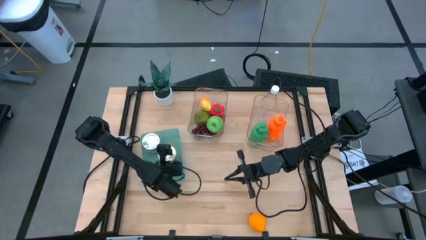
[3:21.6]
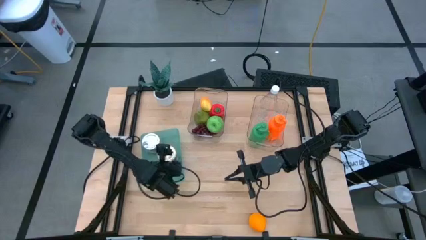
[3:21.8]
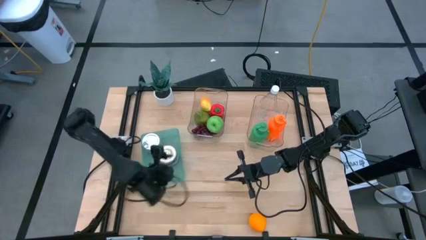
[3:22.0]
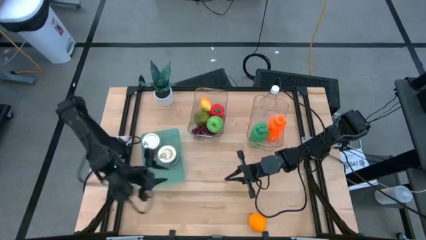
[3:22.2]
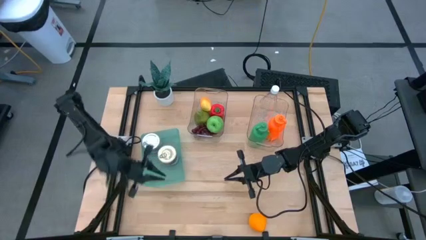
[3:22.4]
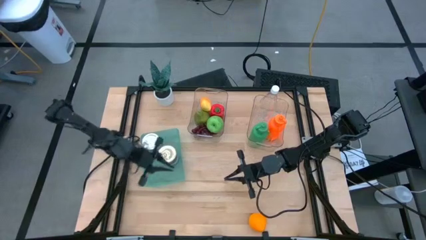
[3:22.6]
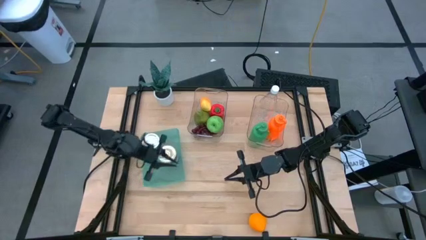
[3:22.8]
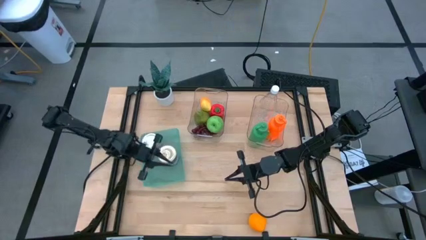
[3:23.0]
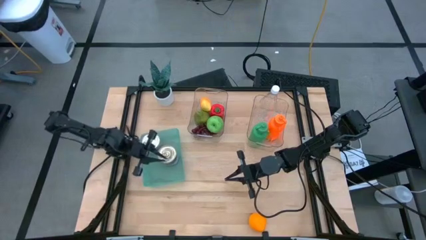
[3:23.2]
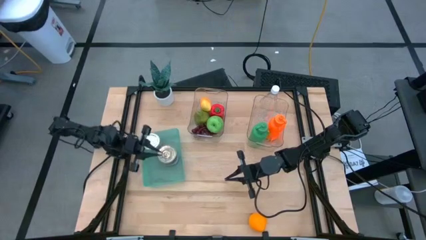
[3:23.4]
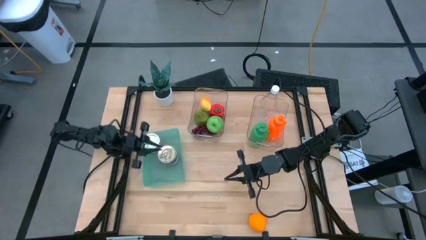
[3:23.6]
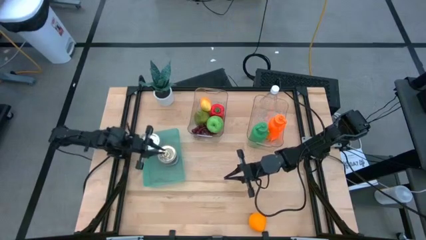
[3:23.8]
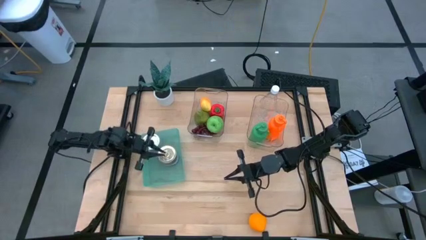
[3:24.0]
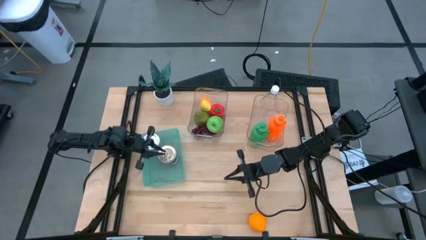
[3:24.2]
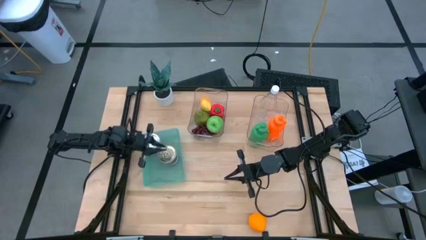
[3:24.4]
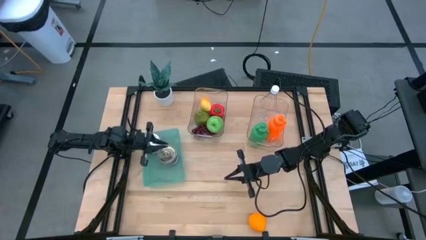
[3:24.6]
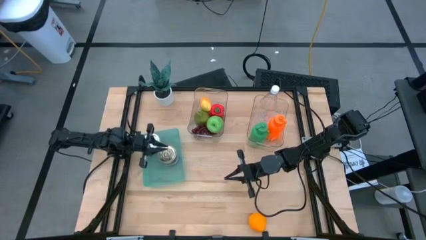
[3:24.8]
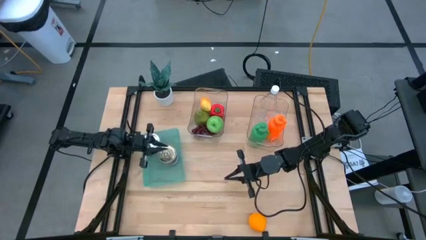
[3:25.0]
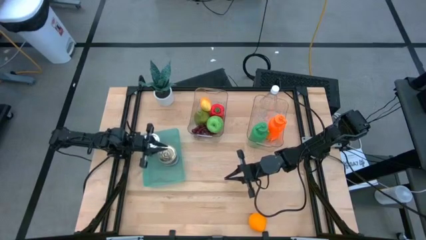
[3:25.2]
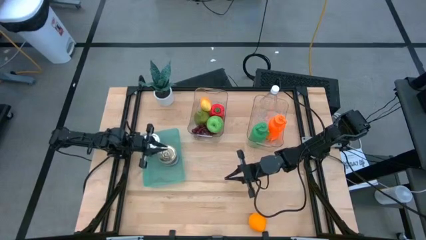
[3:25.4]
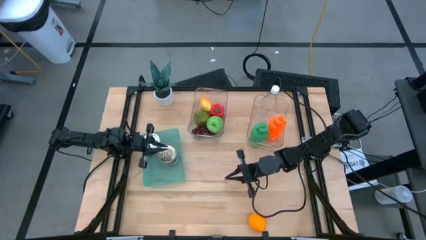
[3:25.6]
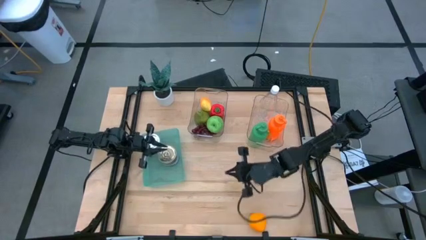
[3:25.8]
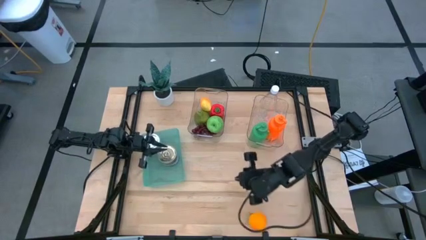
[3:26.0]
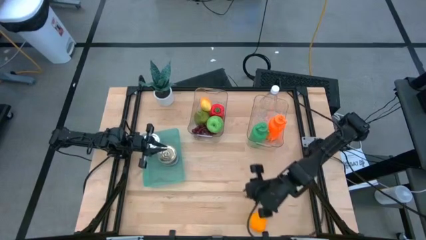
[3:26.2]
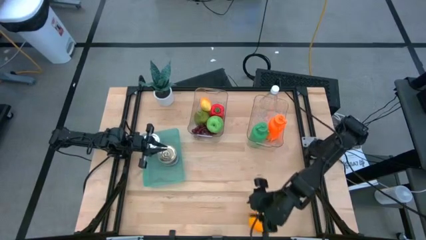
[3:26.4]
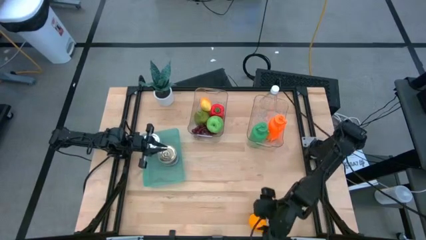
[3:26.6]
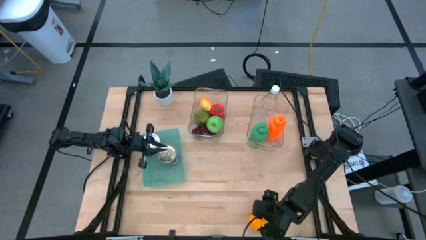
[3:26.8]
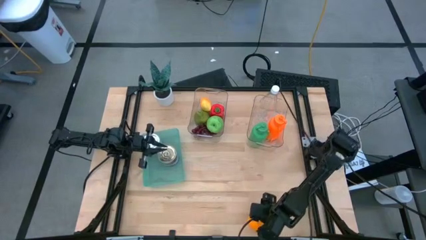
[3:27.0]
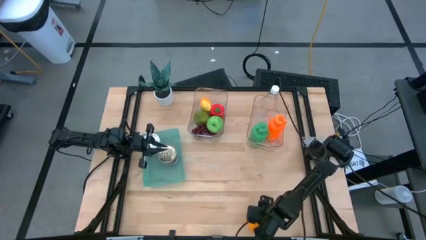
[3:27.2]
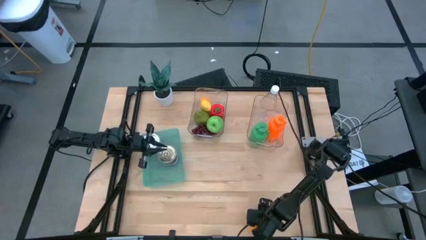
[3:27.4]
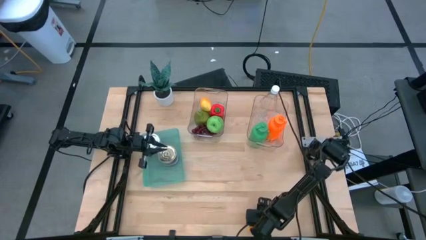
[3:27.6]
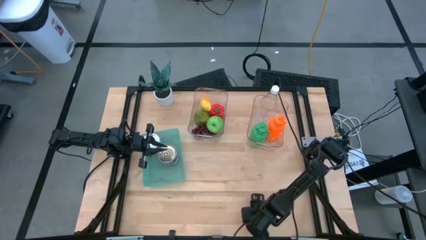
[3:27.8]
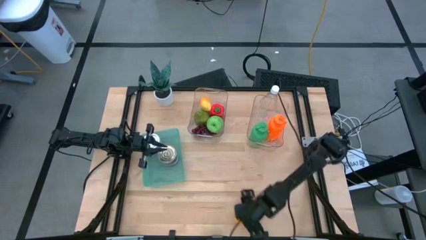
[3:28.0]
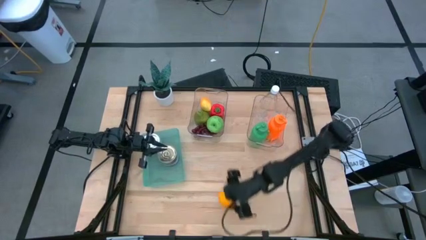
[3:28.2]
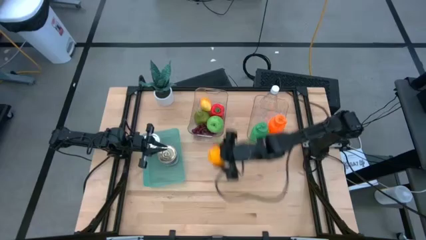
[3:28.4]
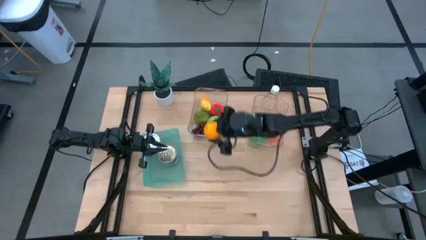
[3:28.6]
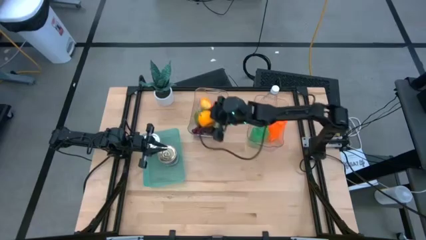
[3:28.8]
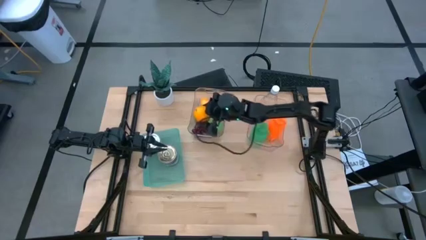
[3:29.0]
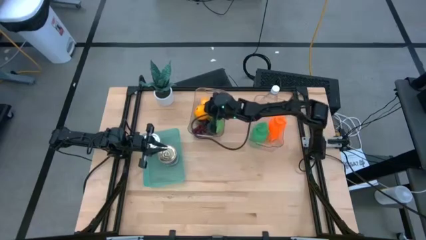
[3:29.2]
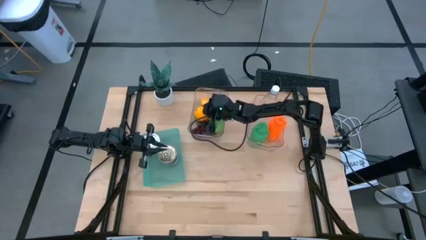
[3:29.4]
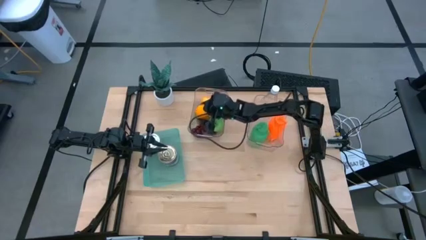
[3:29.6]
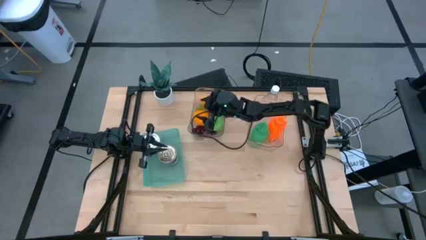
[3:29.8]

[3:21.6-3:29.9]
Task: Pick & Place Food Item
Put the orange into the left transparent bin
